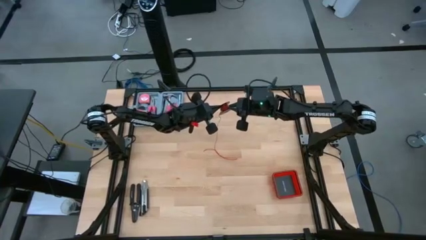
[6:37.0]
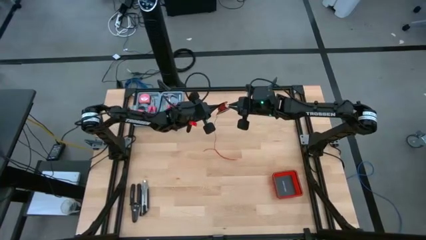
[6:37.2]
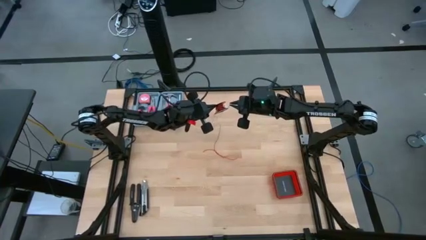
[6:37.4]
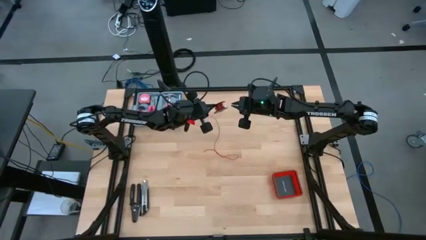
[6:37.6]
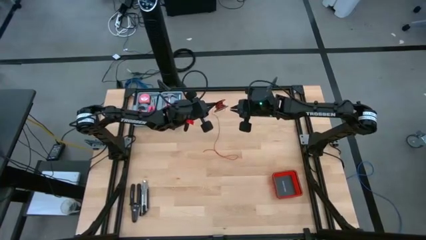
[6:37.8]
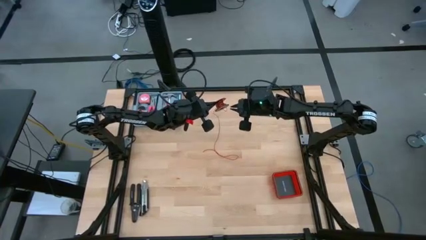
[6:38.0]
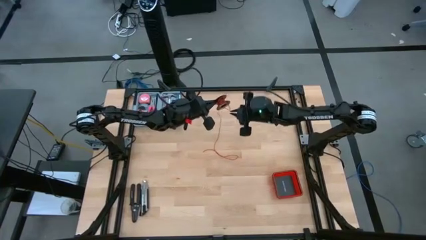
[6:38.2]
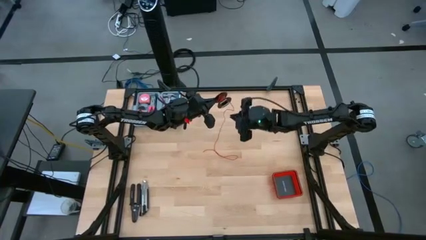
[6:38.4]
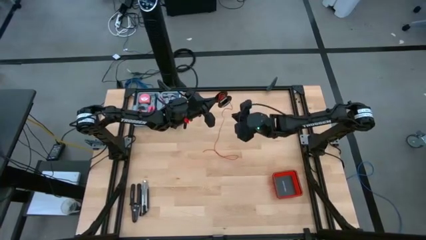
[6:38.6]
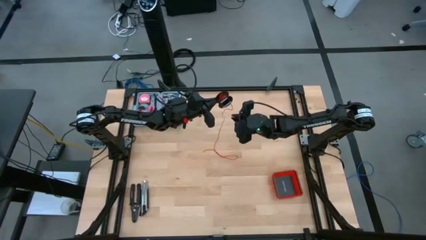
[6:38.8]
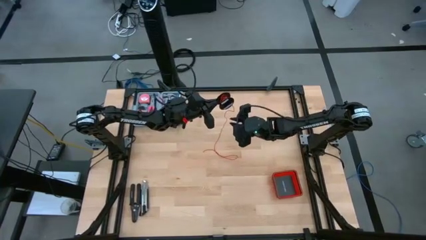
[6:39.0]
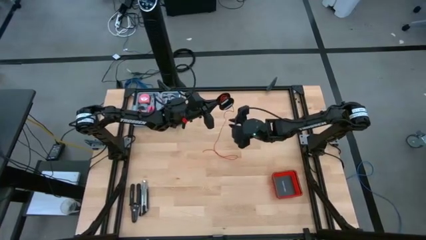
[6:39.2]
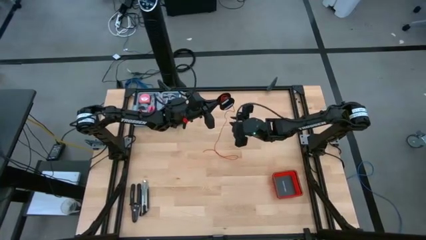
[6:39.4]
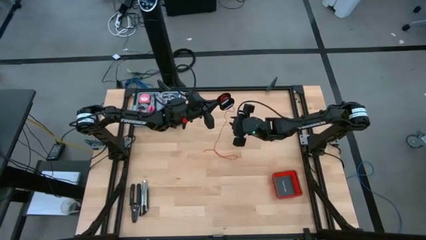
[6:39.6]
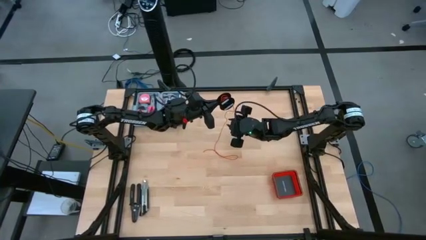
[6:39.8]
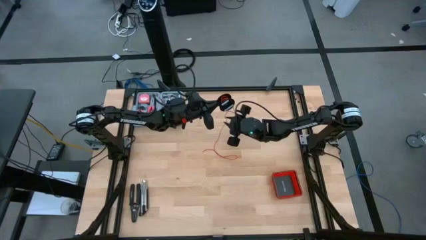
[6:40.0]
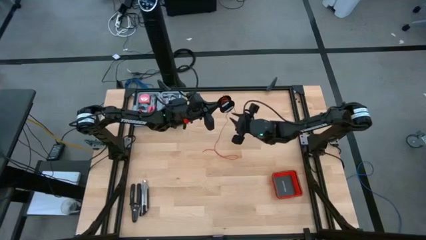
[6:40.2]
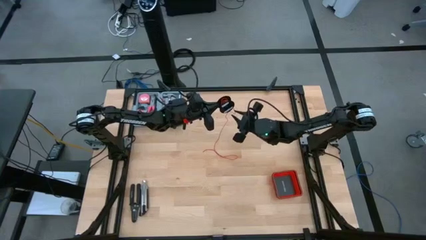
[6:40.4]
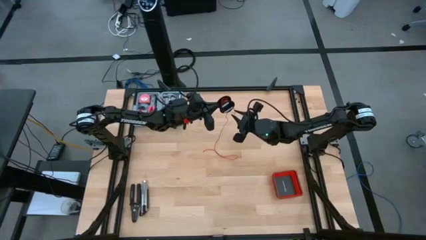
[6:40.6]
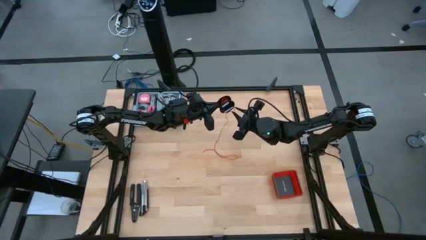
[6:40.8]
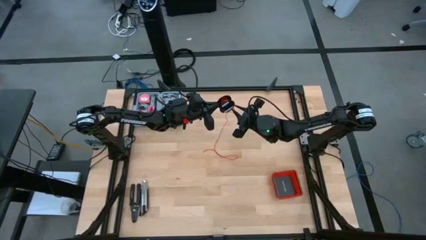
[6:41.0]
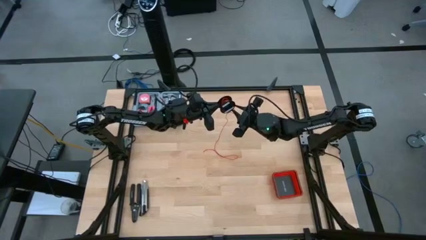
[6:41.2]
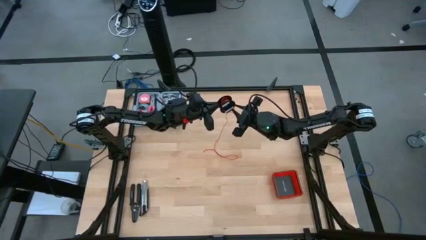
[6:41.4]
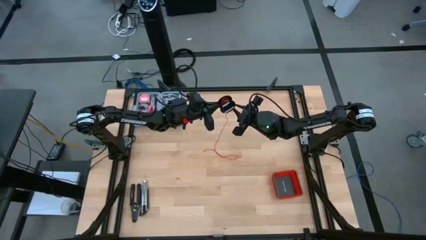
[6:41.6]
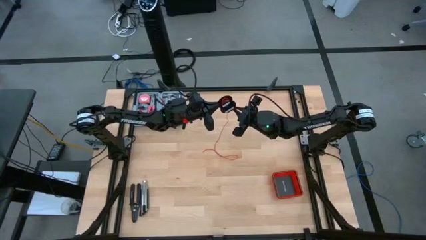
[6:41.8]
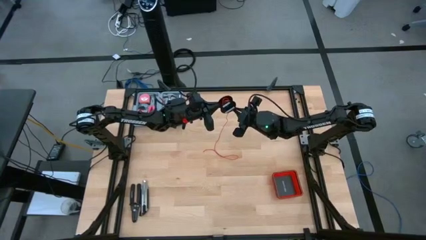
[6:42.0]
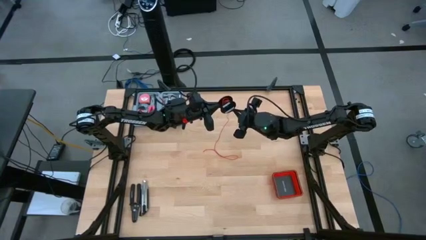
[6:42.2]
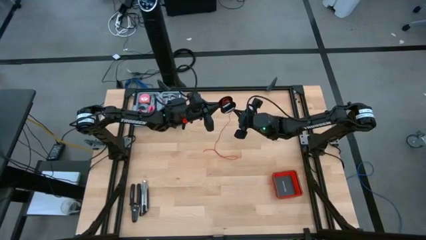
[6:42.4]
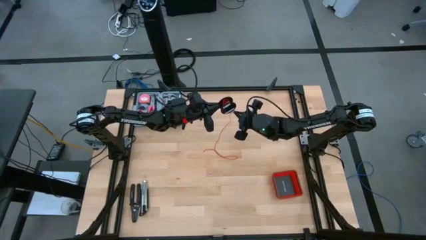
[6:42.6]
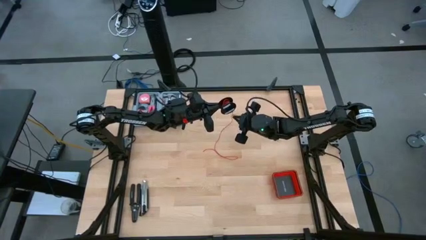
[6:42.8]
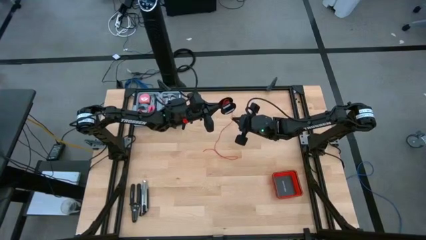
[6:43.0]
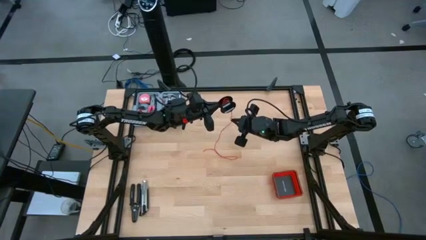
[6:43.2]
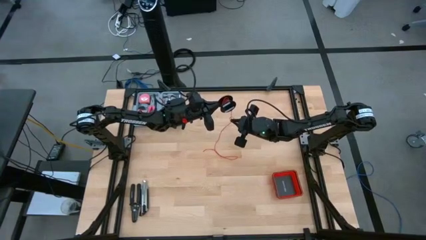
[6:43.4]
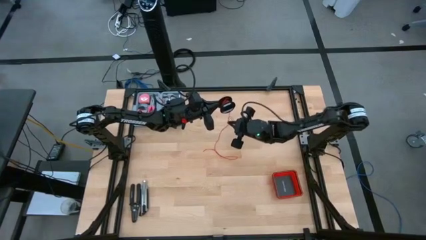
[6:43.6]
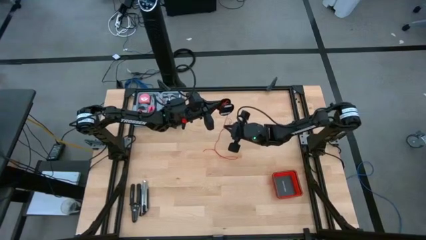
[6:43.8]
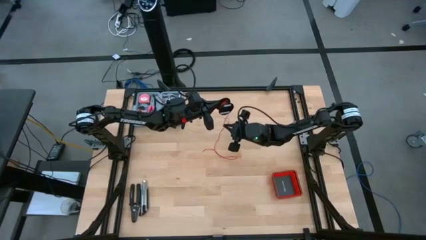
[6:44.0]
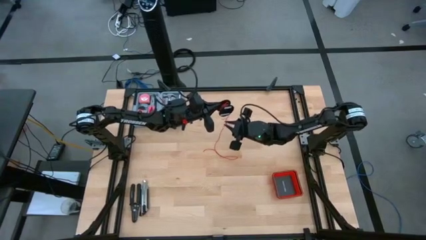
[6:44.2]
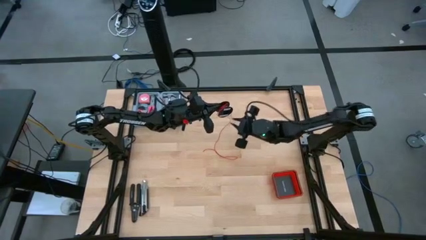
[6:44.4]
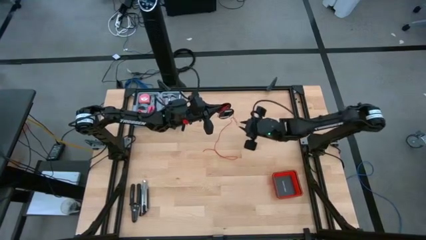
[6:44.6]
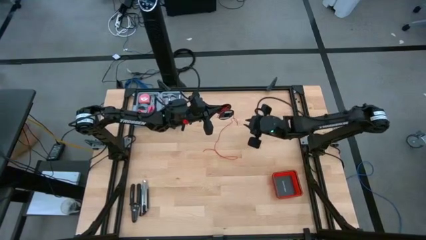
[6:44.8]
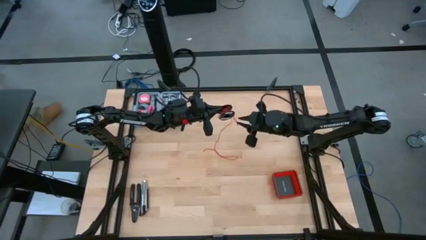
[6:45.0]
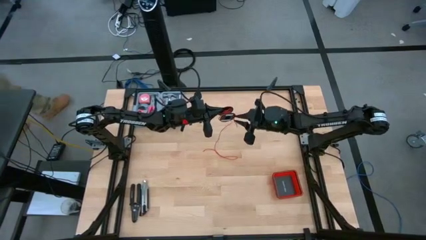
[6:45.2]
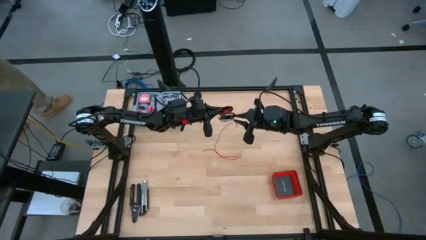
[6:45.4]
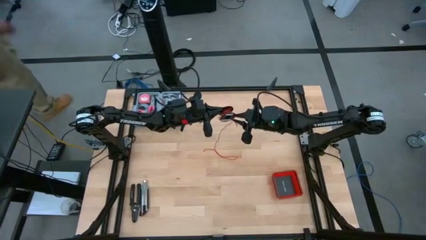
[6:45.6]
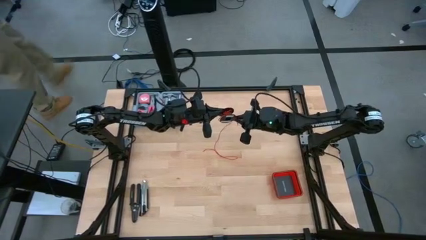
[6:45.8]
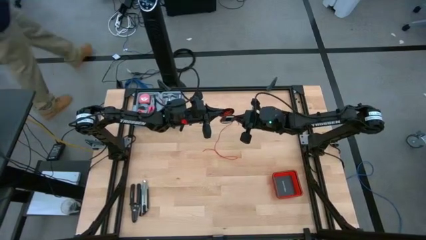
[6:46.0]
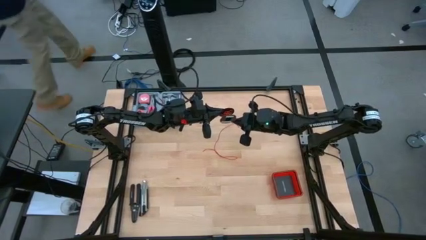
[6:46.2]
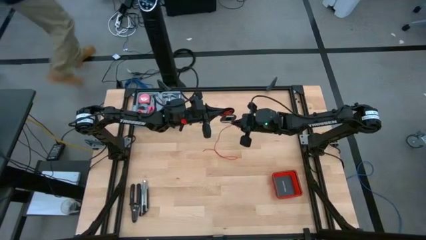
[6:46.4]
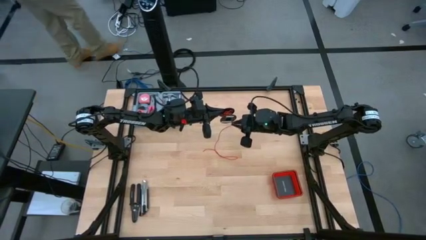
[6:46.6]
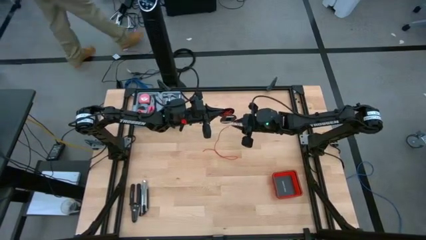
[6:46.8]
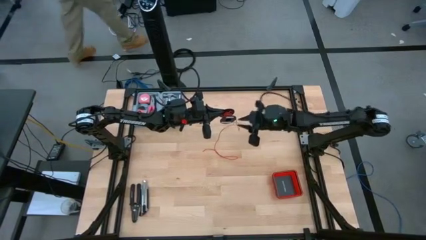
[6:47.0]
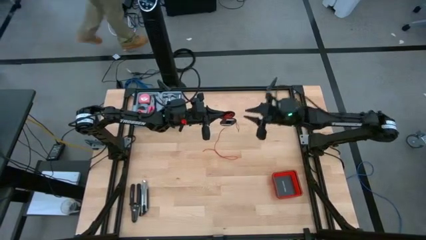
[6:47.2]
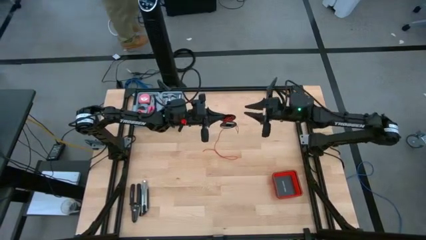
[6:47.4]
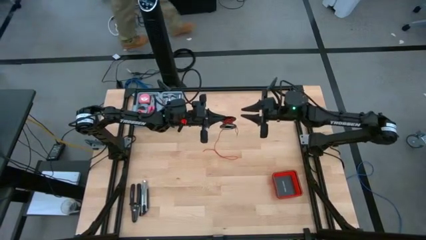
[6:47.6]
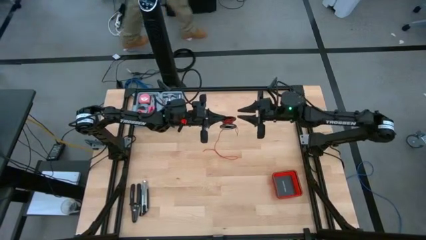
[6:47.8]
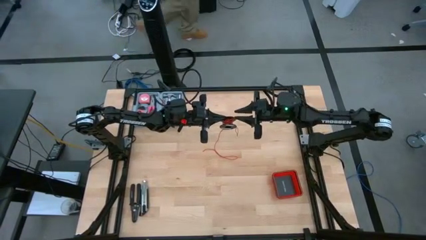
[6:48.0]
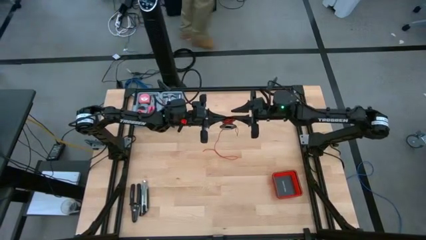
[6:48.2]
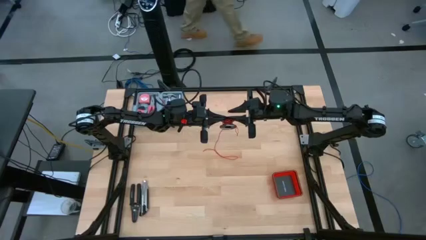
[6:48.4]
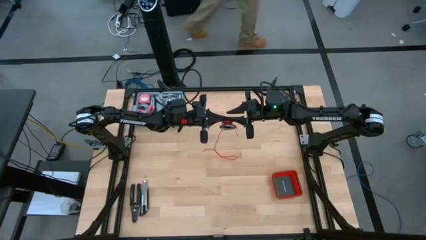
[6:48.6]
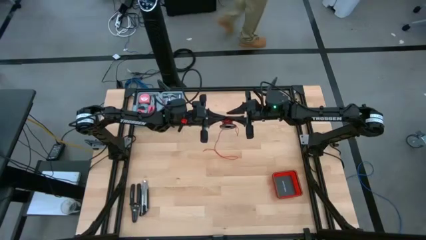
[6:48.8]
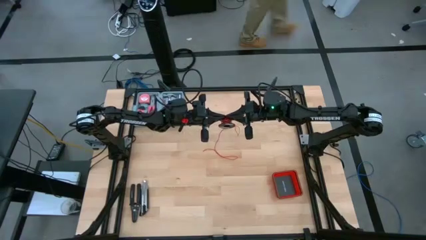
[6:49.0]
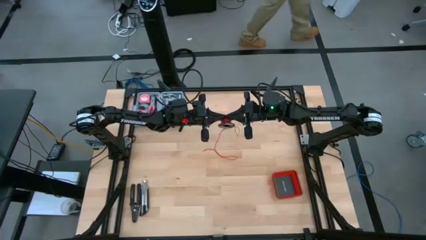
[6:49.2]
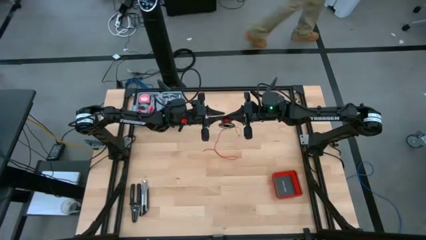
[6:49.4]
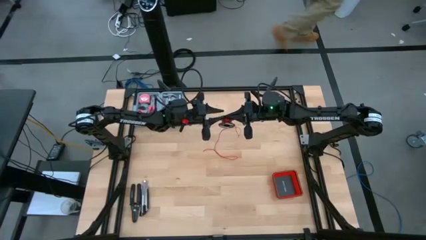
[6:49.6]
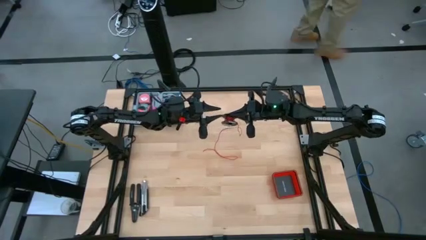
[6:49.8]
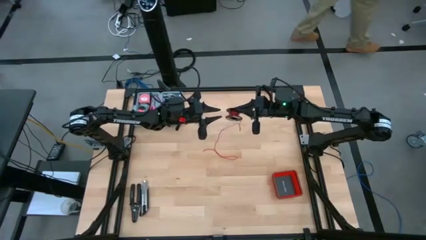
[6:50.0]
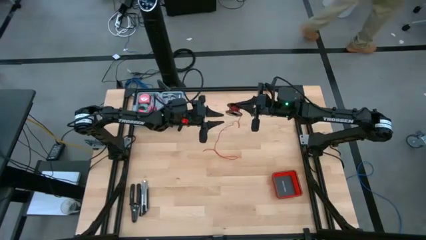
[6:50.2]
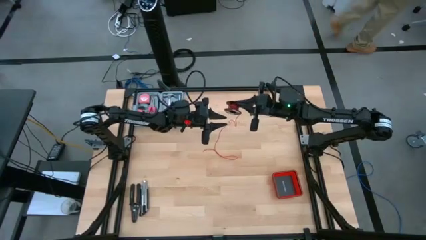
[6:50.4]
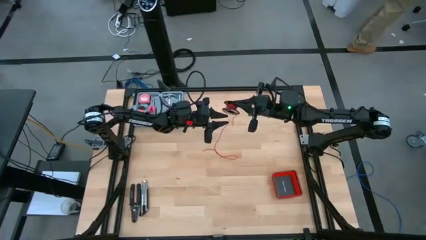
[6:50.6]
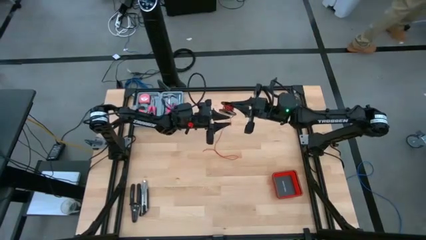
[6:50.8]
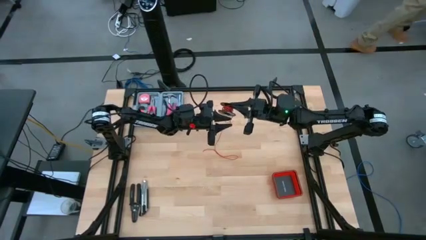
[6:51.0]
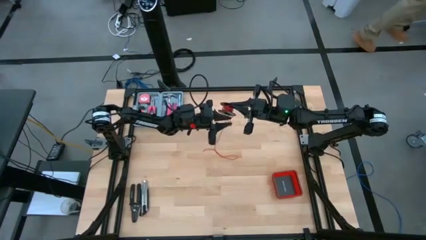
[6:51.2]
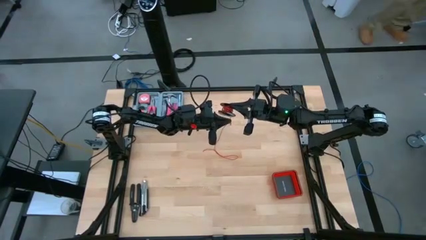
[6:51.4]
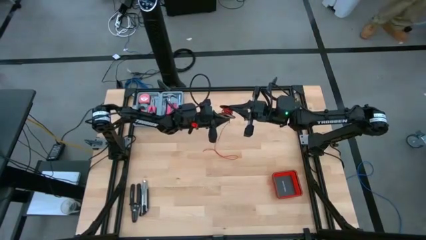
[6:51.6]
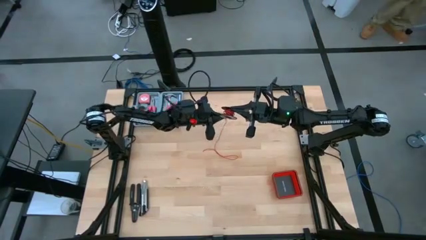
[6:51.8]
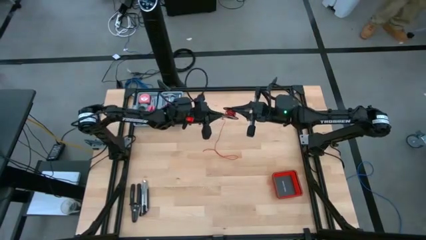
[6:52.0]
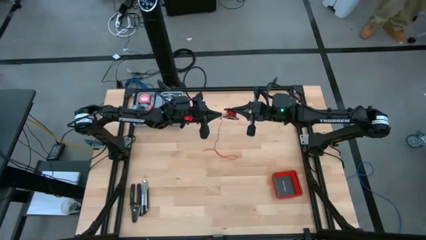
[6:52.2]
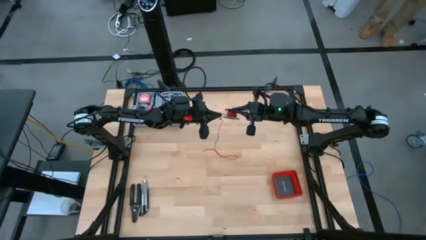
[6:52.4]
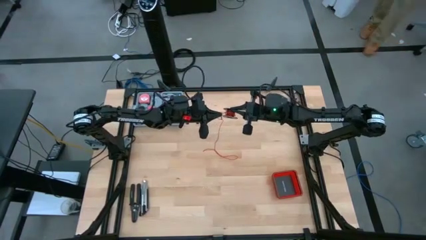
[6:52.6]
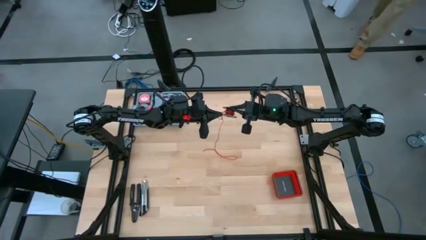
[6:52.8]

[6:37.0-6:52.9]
Task: Coil cords
Coil the red wire onto the spool
